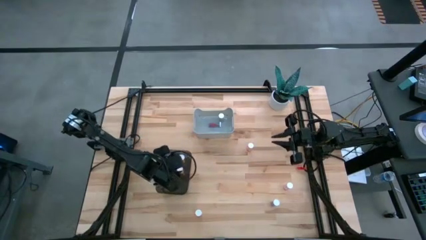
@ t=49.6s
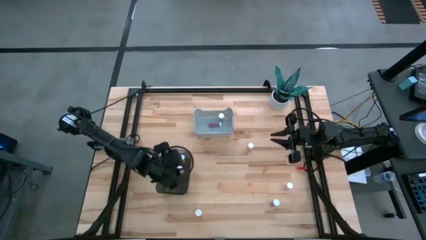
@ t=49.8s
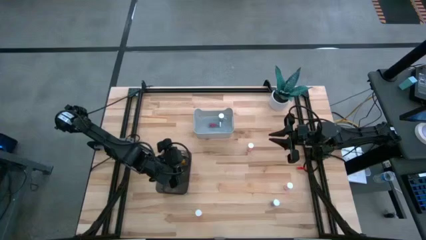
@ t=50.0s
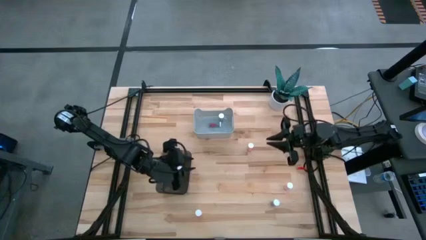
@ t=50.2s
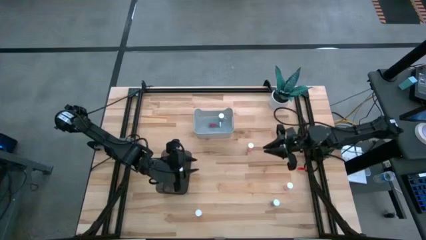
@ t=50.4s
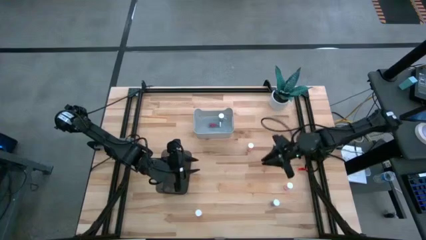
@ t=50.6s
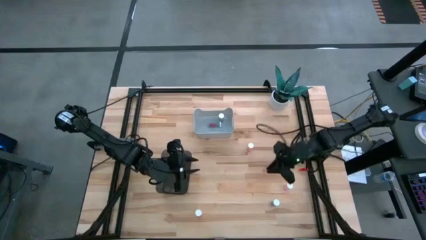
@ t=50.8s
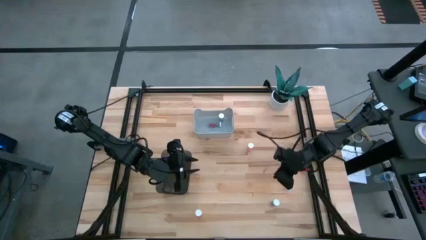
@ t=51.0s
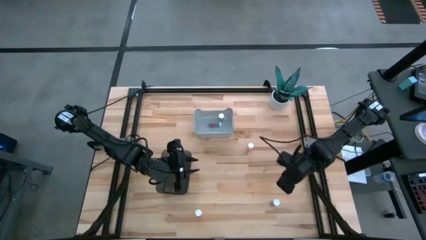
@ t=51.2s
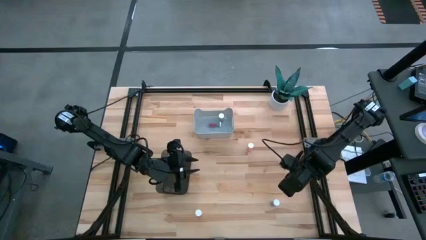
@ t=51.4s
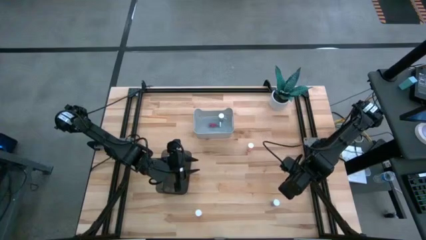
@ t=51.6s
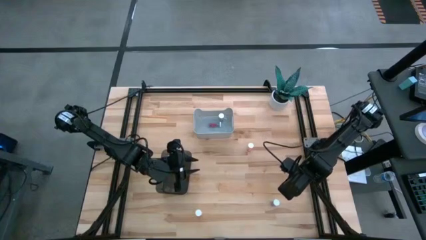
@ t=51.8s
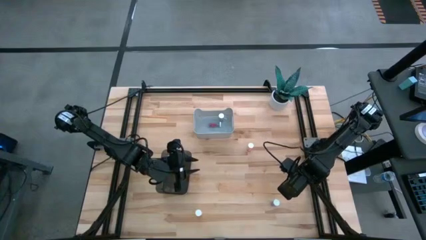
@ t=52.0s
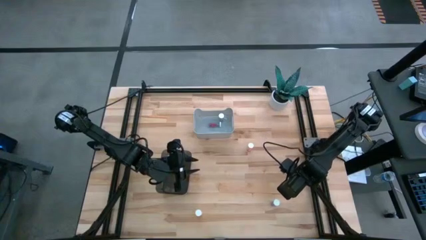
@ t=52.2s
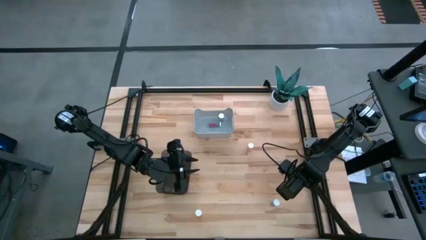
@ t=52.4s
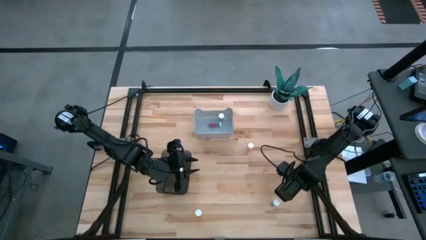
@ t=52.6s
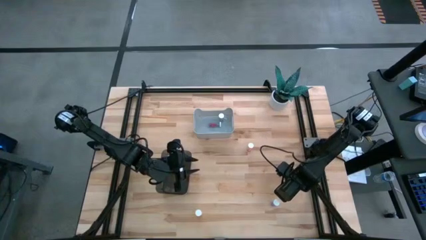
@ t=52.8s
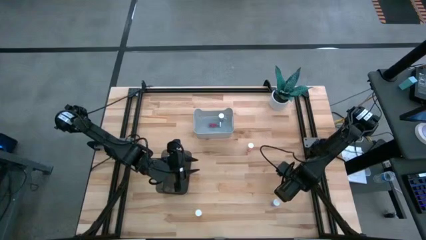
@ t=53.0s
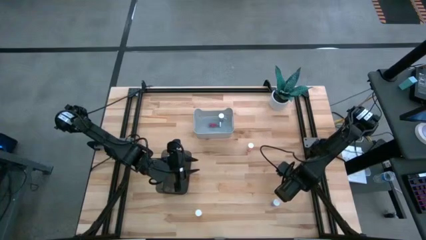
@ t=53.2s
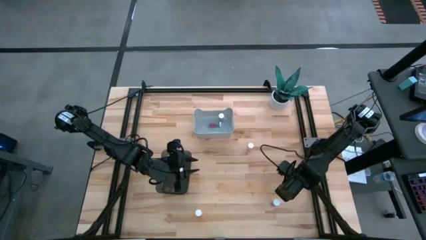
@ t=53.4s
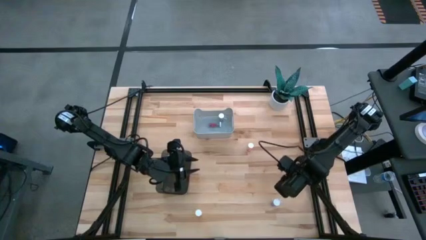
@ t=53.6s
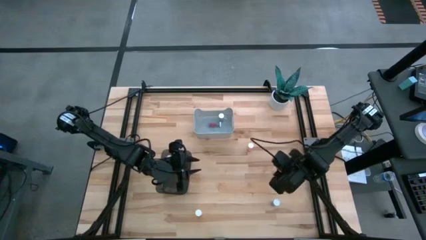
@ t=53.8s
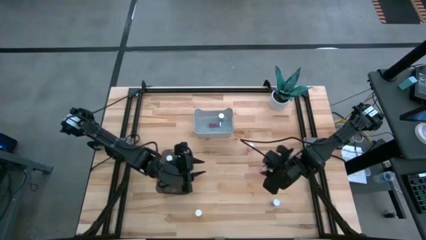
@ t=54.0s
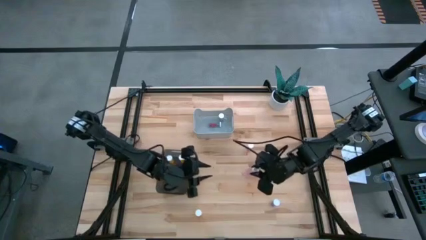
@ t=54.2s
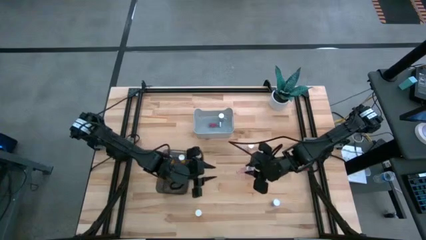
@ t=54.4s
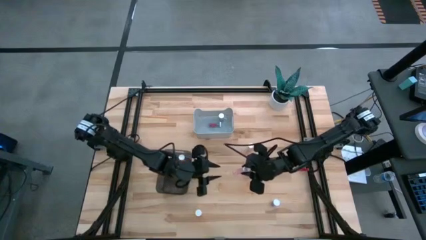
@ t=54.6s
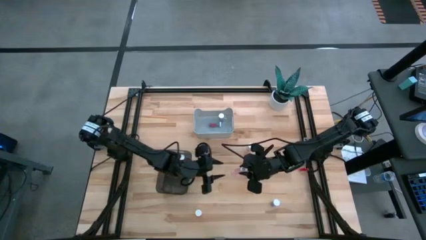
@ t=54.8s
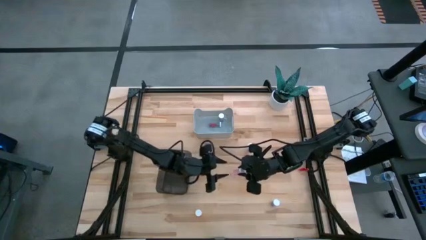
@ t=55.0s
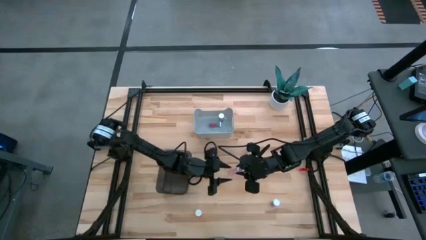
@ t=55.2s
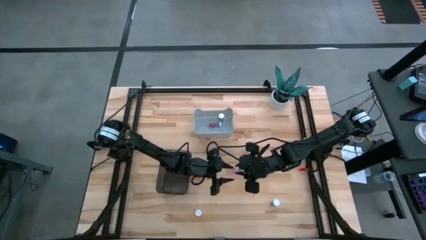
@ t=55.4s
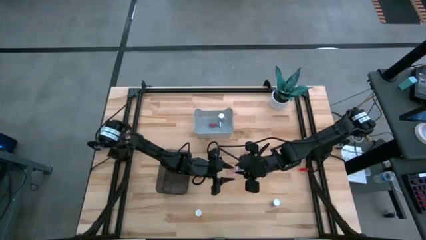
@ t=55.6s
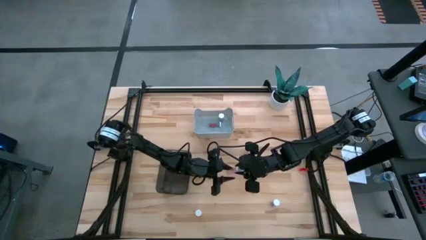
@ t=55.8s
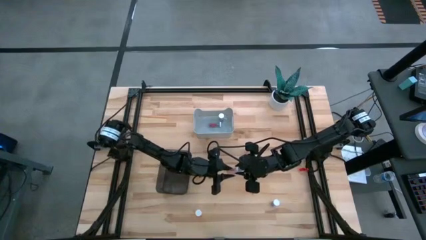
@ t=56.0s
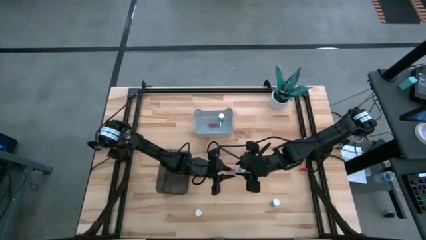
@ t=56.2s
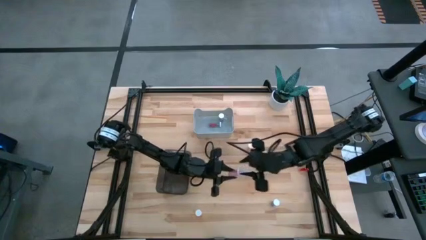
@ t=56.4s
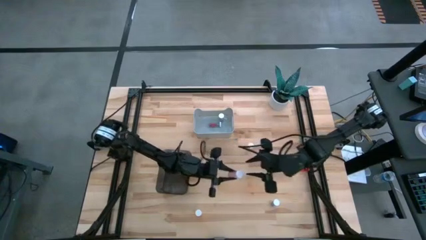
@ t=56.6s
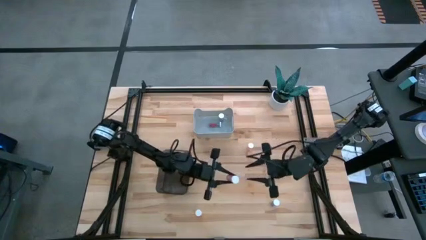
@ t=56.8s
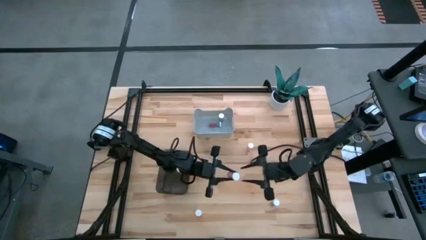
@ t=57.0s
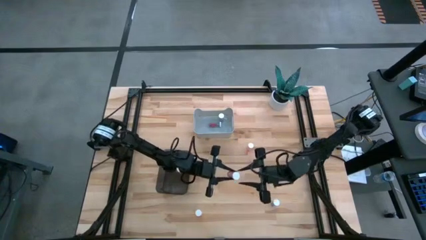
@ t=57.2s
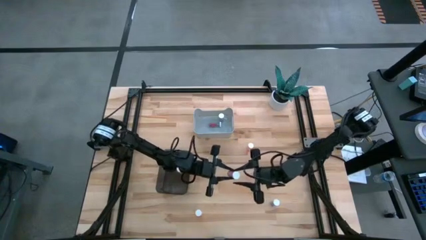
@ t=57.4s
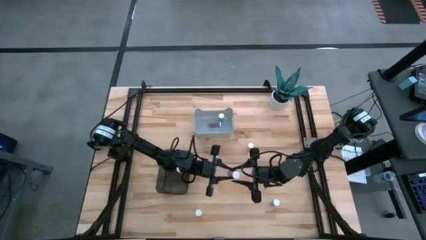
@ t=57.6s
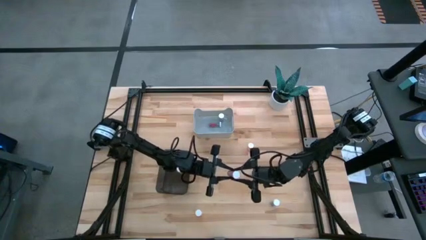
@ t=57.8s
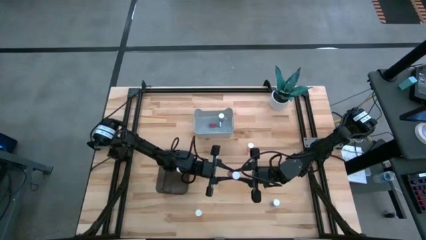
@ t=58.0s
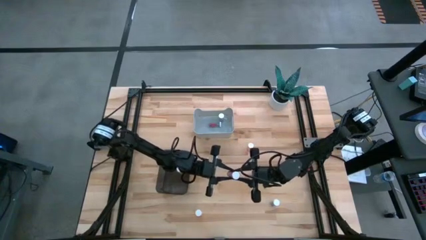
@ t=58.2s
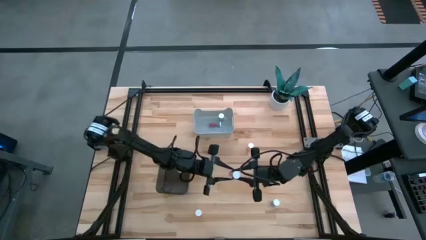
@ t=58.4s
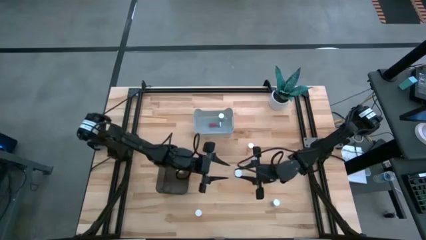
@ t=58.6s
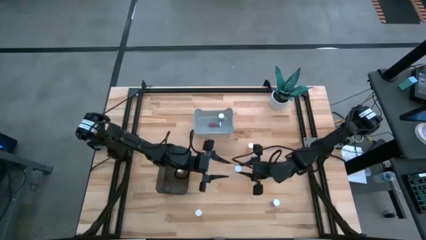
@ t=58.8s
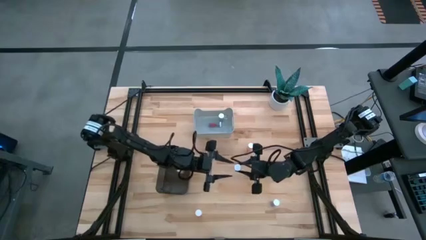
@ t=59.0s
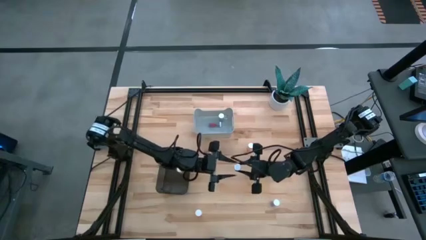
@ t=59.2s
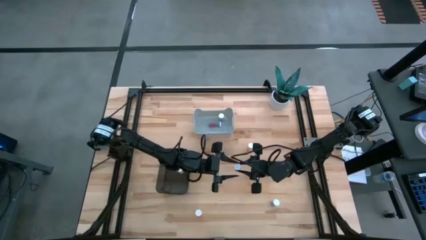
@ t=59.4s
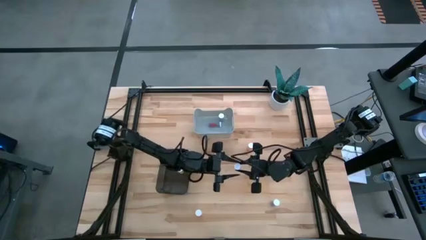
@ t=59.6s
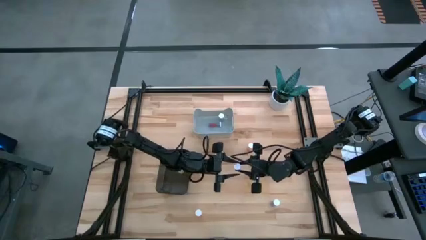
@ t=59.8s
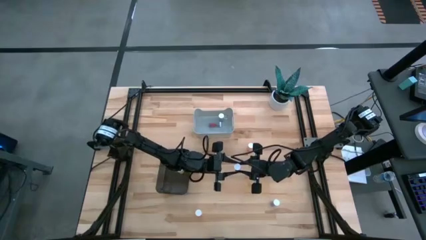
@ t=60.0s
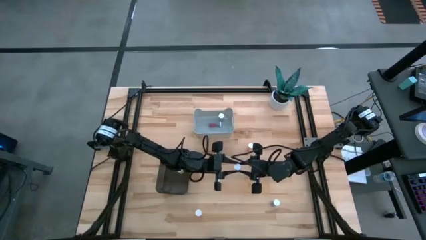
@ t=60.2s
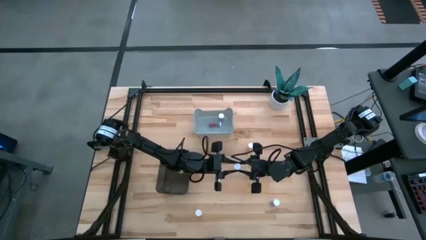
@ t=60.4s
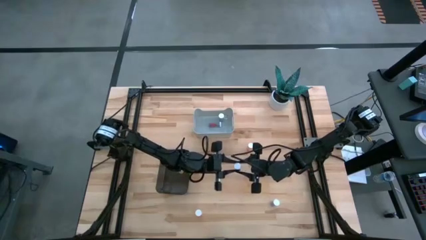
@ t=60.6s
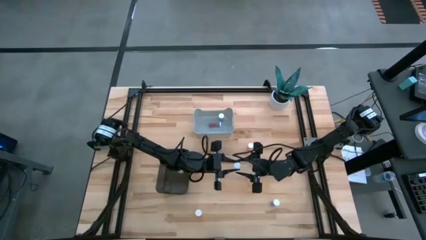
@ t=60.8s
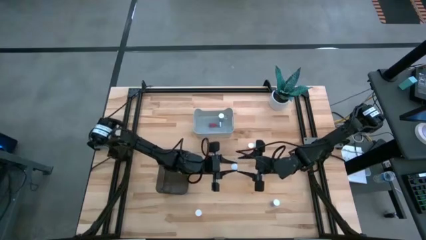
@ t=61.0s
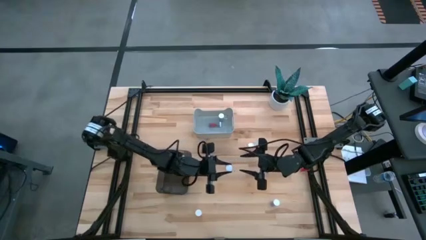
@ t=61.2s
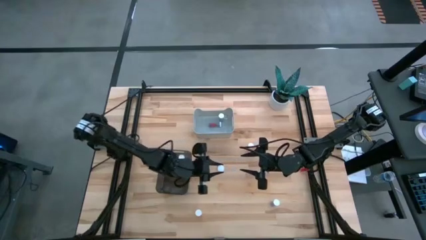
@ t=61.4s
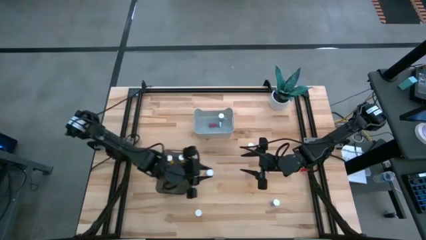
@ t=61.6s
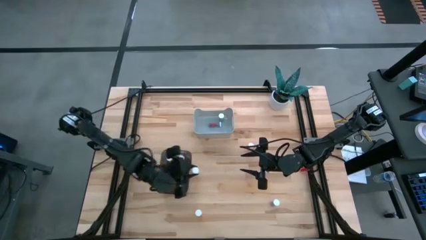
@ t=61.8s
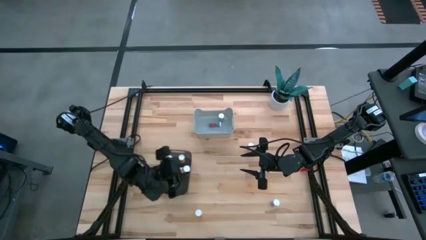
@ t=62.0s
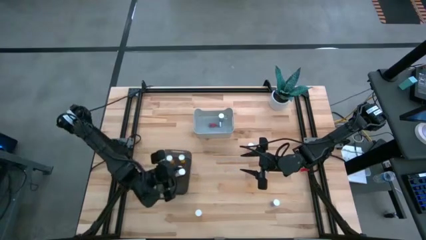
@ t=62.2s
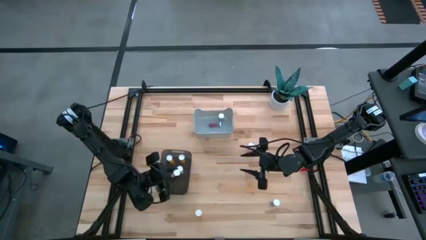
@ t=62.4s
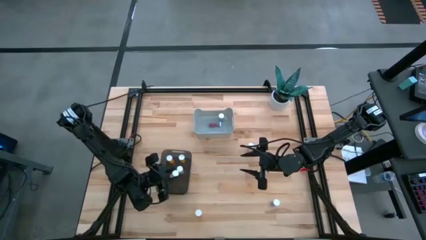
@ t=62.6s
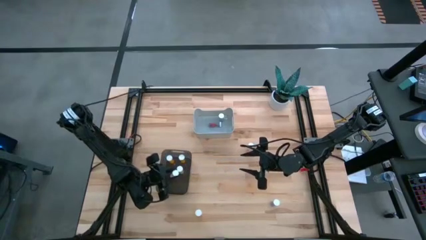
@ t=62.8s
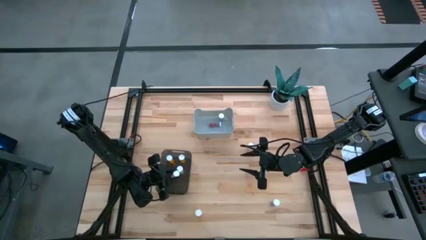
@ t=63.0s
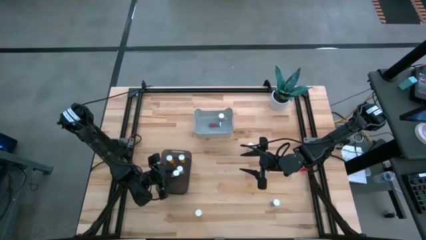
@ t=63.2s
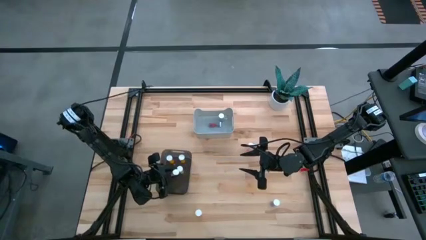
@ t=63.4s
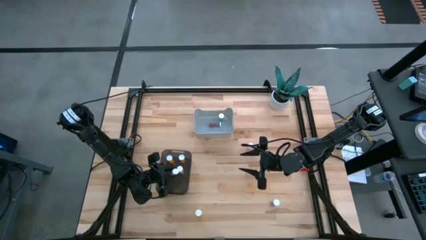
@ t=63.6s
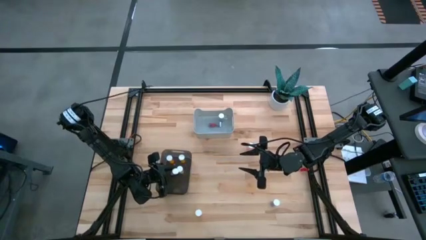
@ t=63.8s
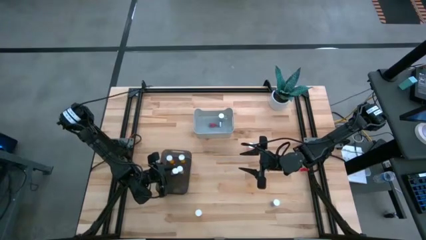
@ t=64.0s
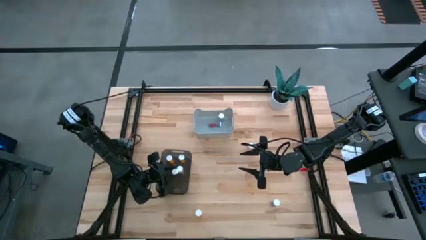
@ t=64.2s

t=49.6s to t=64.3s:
Task: Pick and place medicine bottles into bin by pill shape (circle, oval)
Put the pink tablet bottle into the black bin
